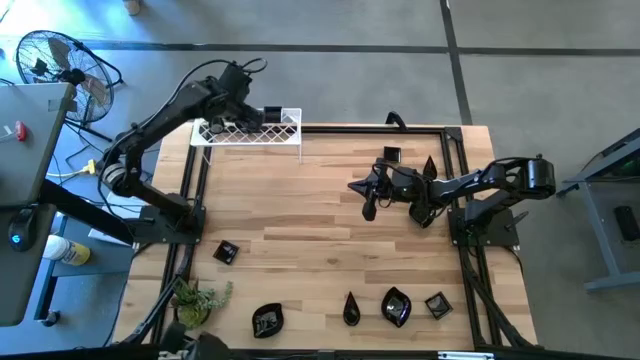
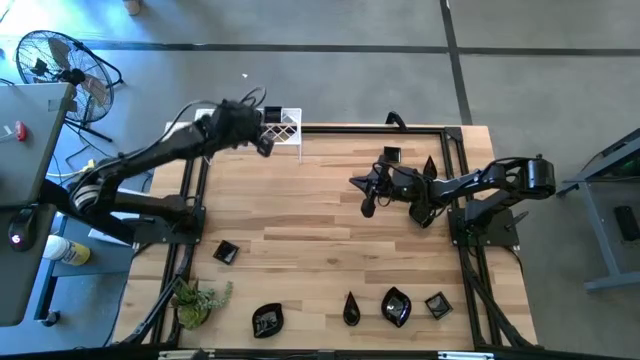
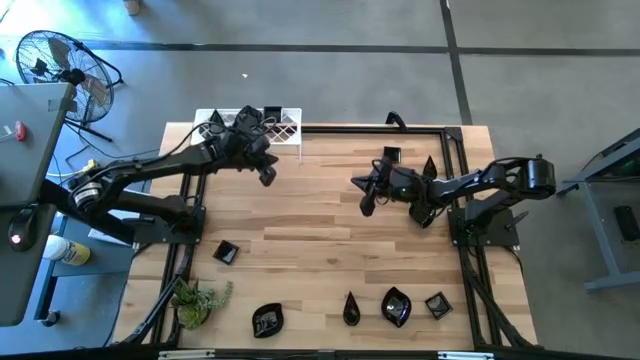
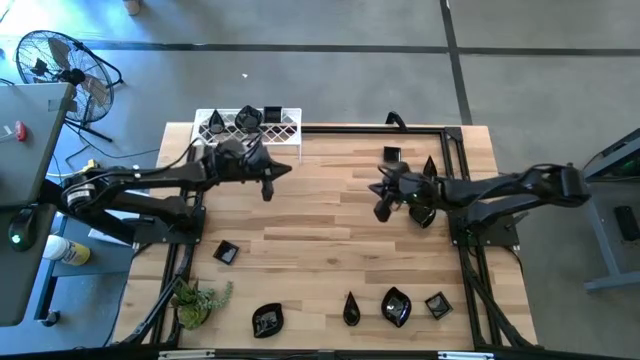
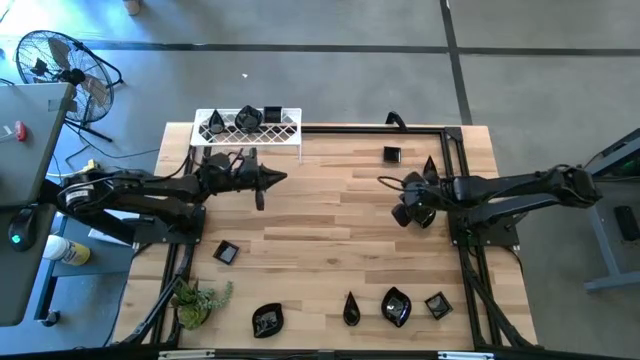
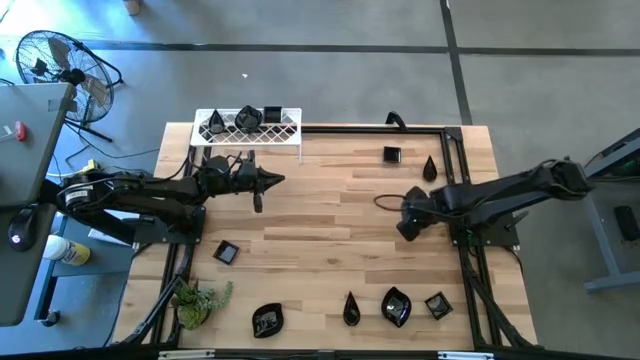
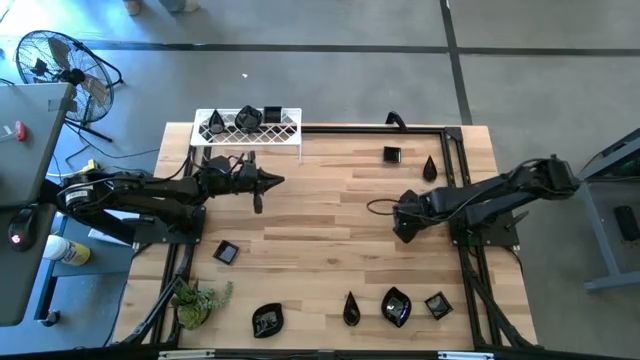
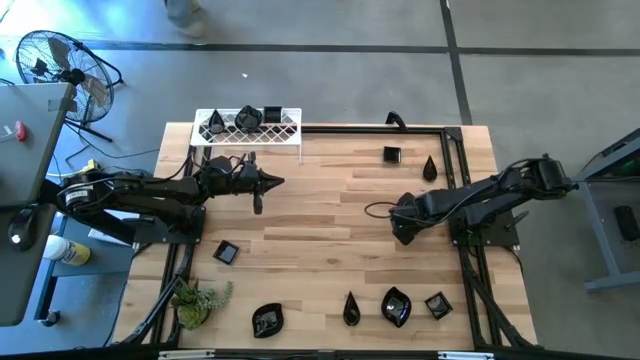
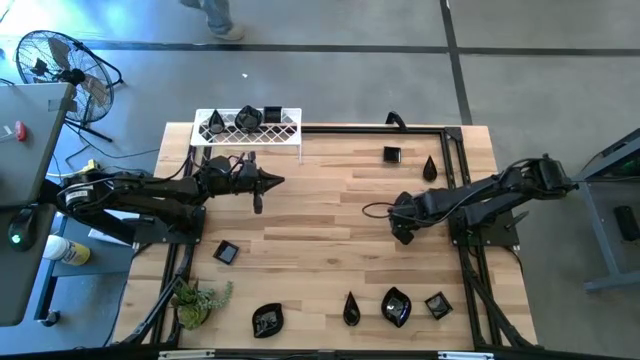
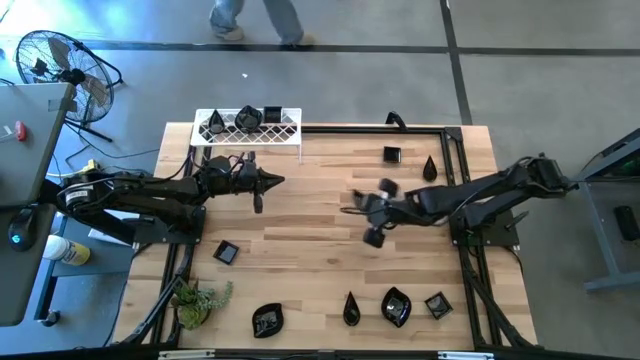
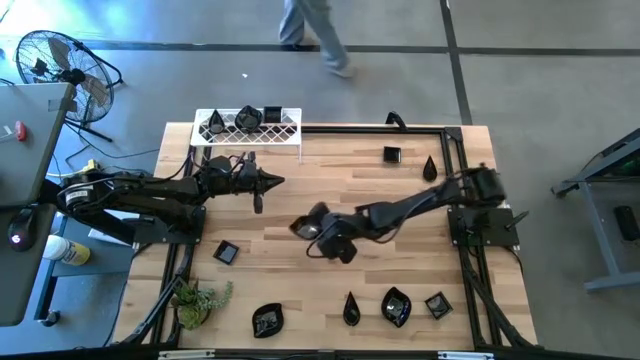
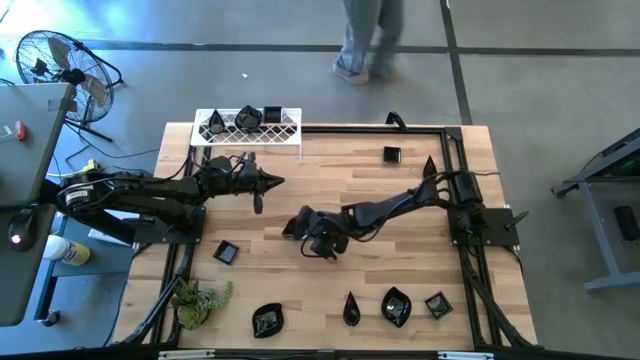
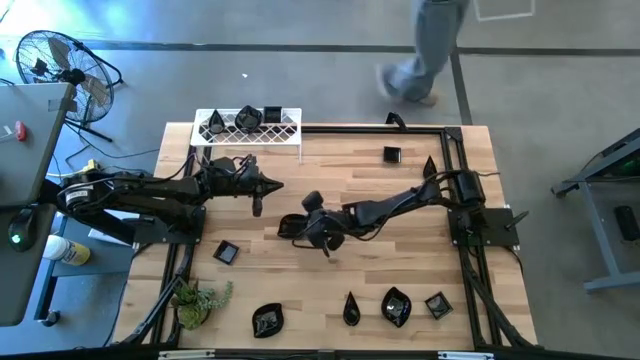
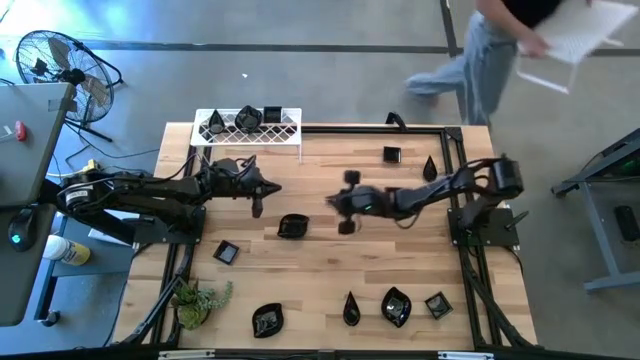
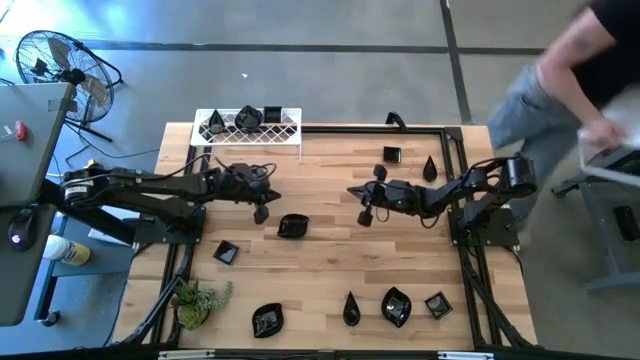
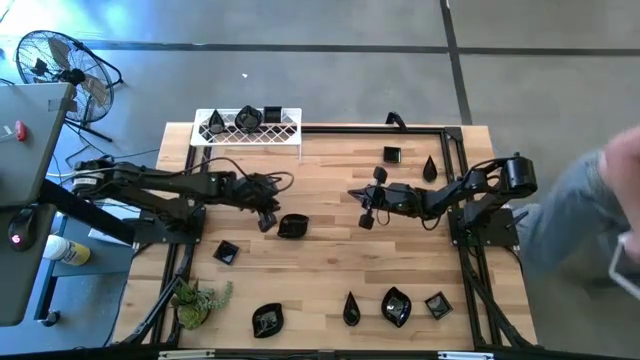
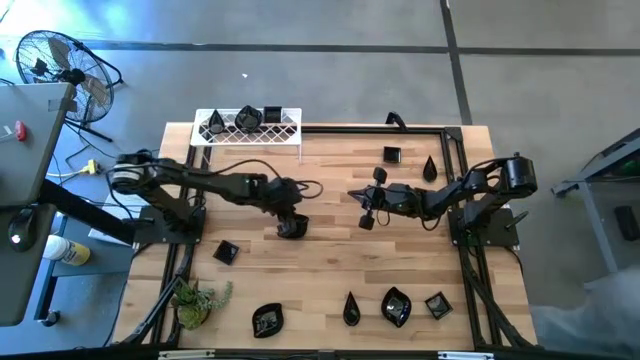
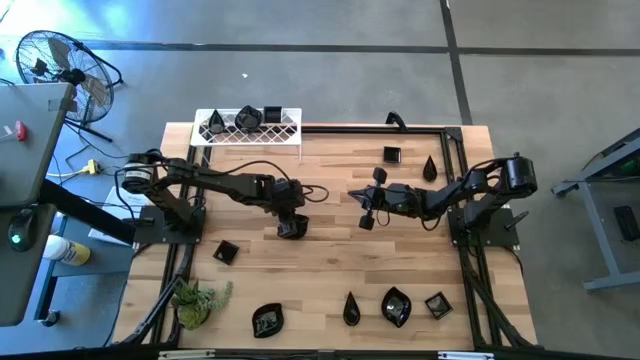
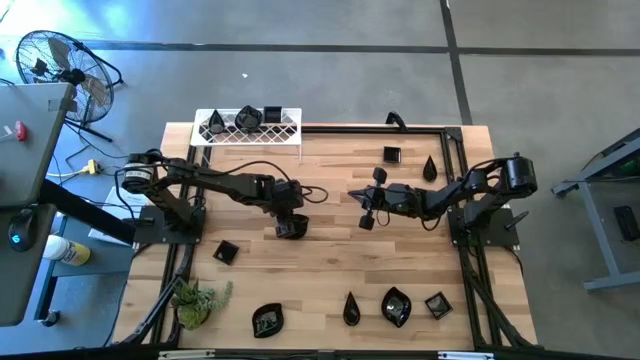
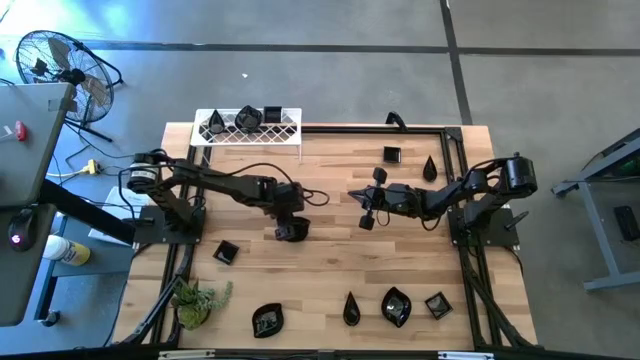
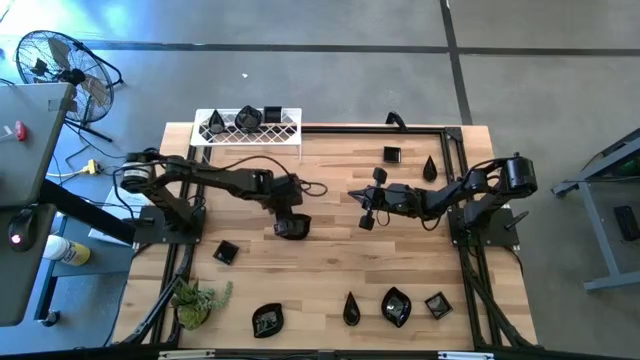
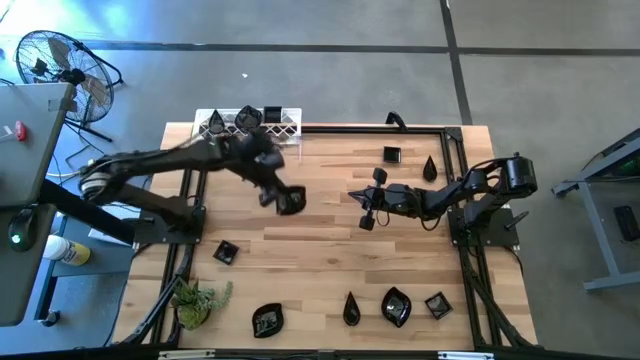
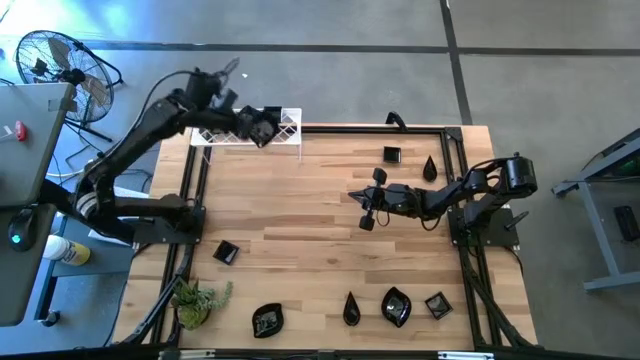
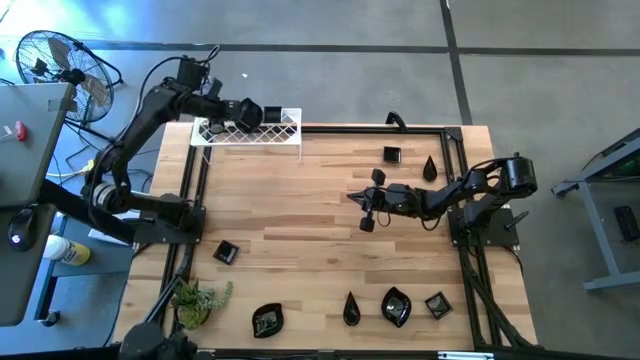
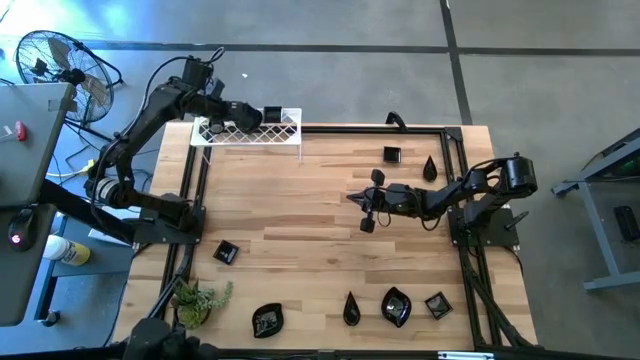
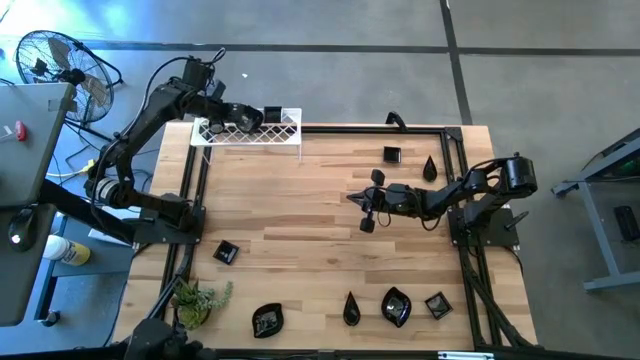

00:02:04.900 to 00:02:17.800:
Task: Pick & Place Mini shaped plates
Stack the top right leaf-shaped plate on top of the leaf-shaped plates on the shelf

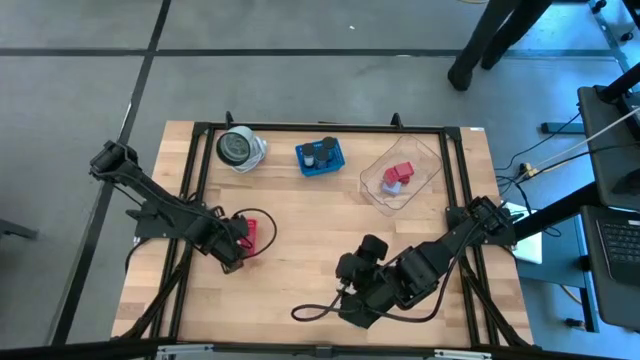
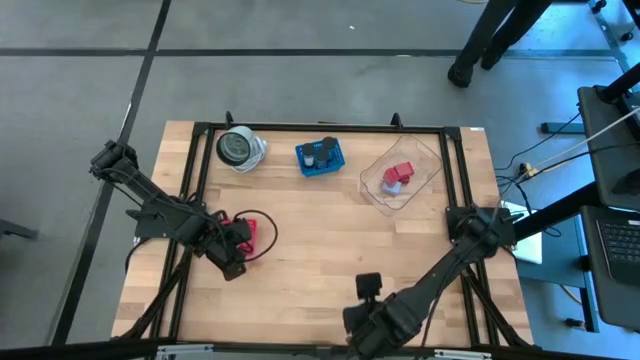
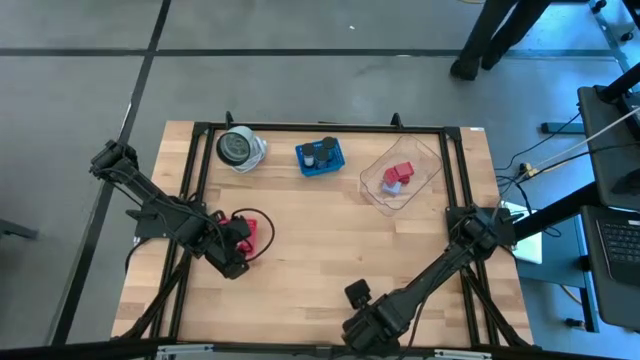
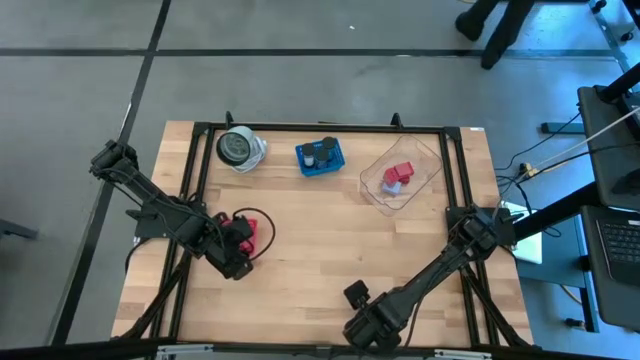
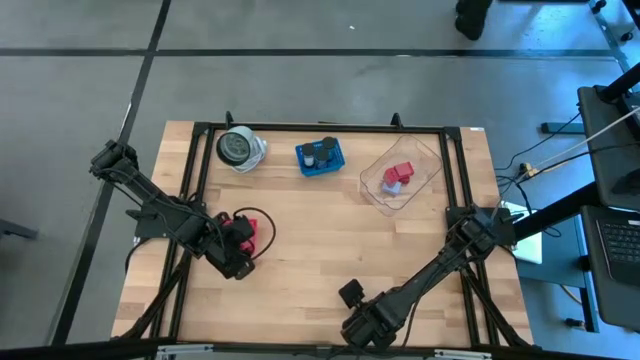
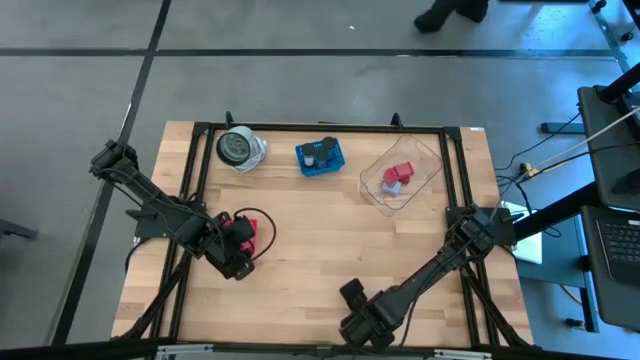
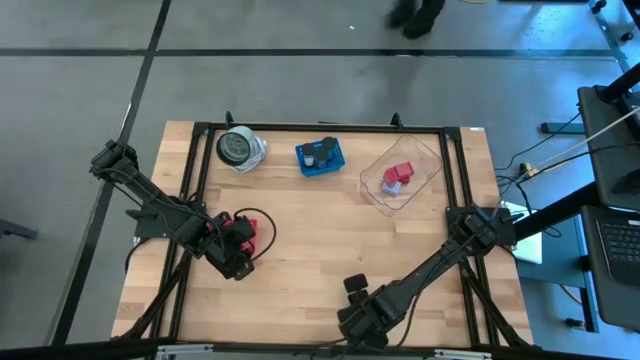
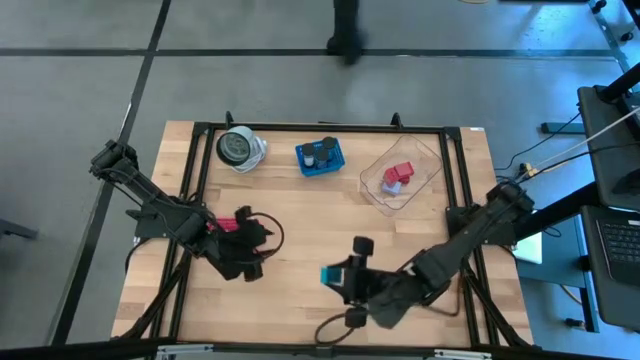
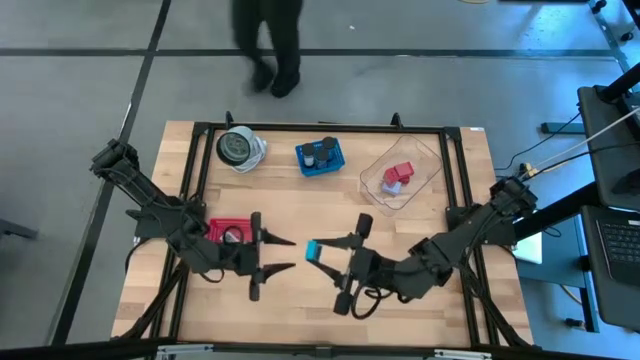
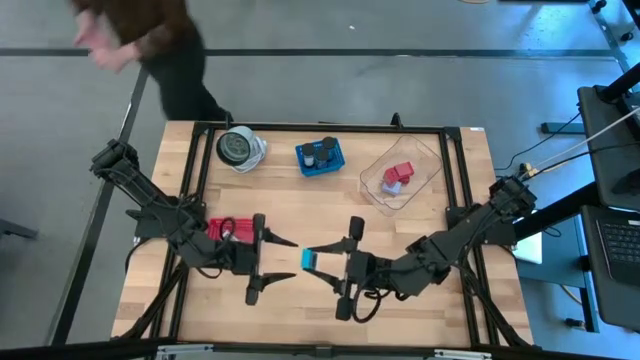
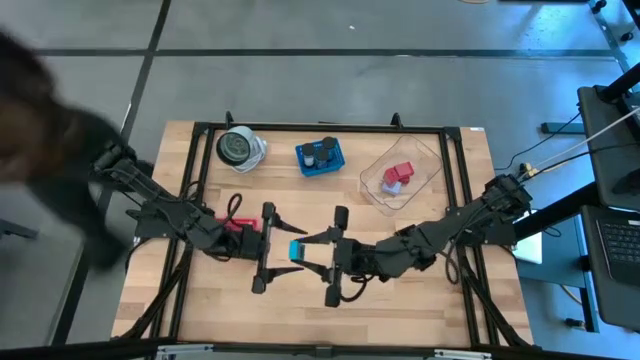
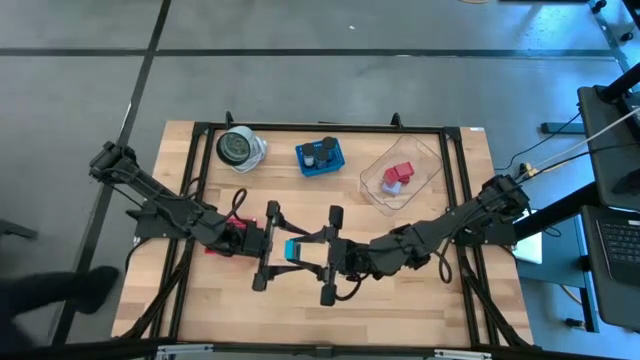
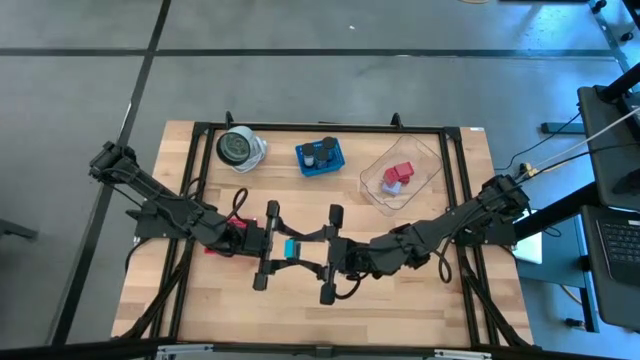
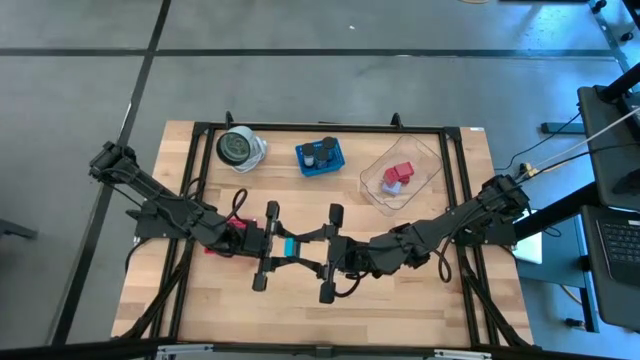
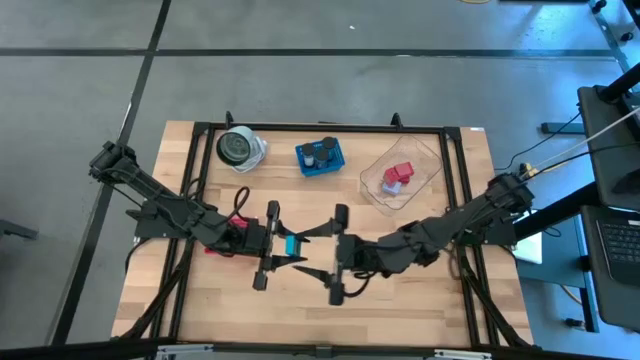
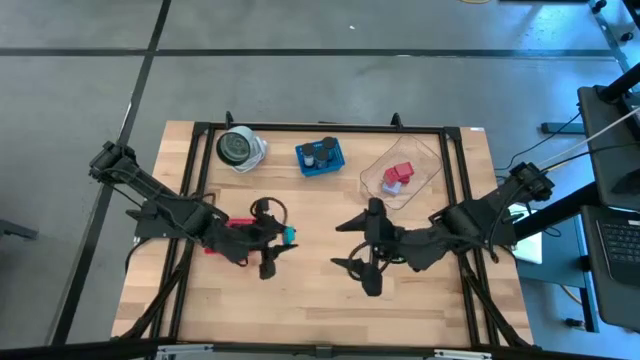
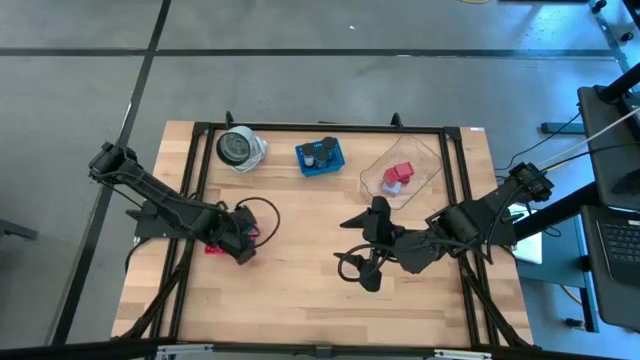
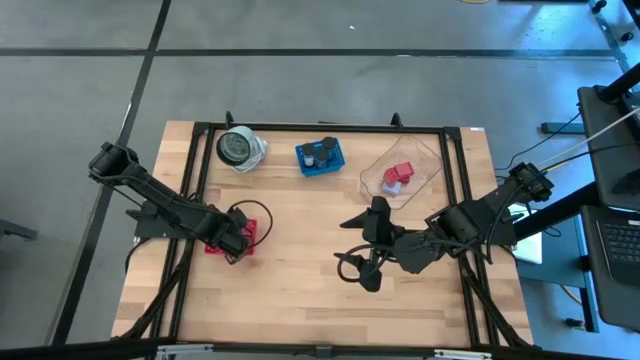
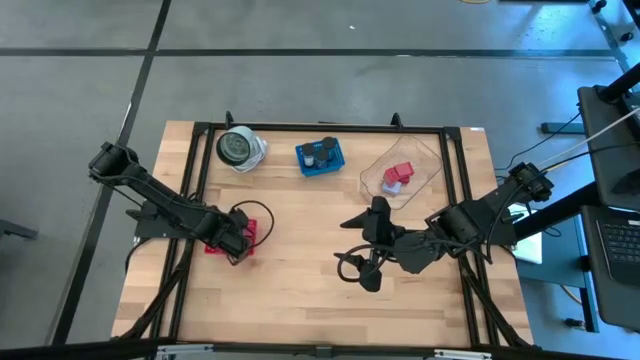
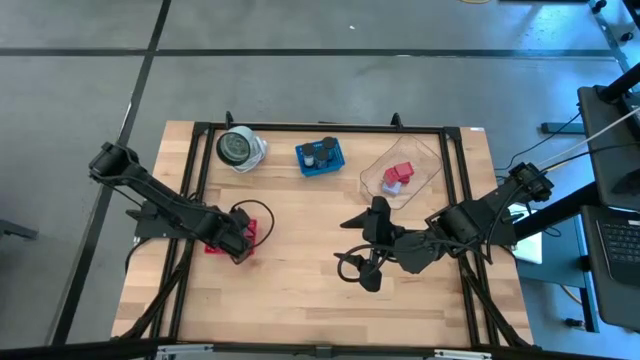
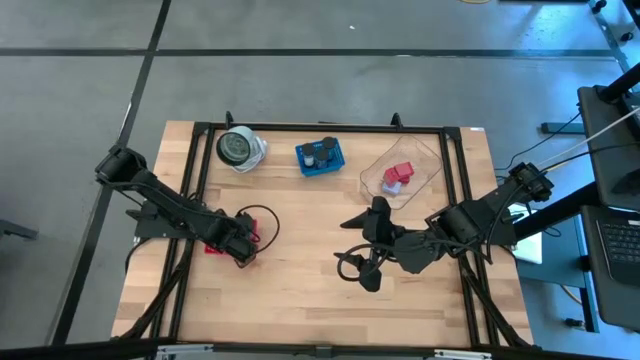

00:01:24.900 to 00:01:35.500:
Task: Pick & Place Office items
Put the blue digital alarm clock into the red basket
